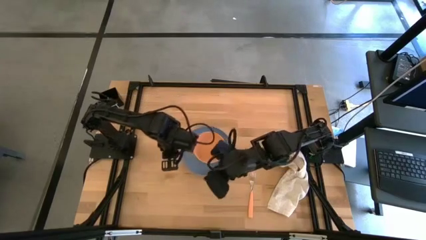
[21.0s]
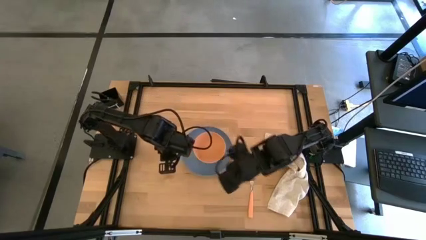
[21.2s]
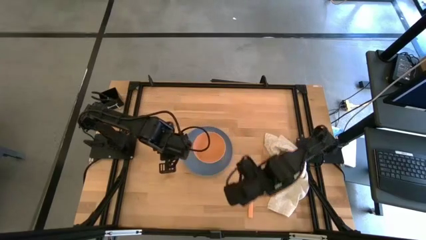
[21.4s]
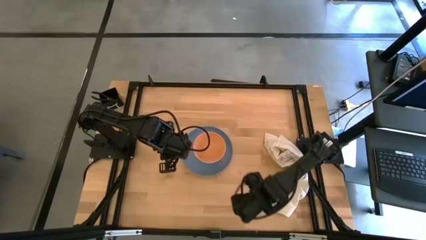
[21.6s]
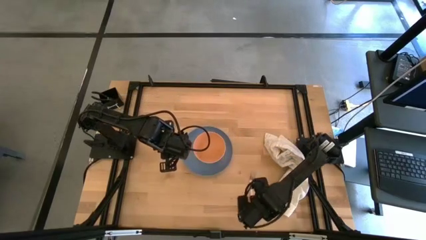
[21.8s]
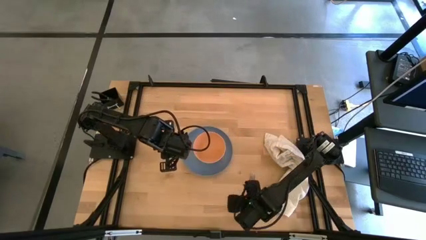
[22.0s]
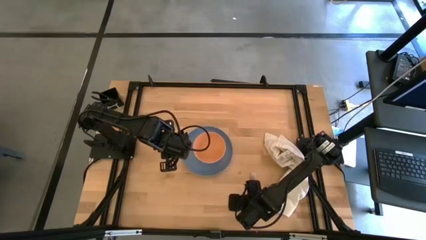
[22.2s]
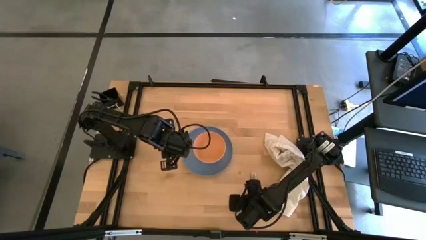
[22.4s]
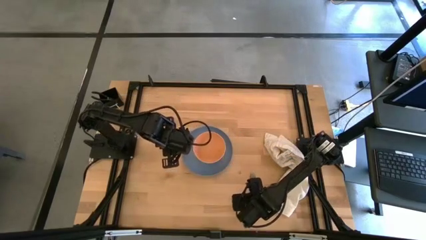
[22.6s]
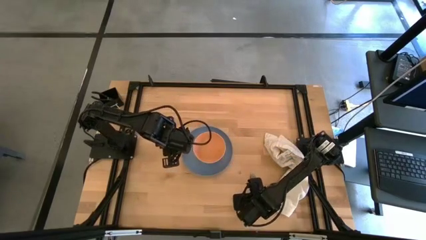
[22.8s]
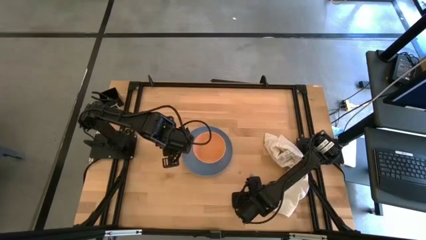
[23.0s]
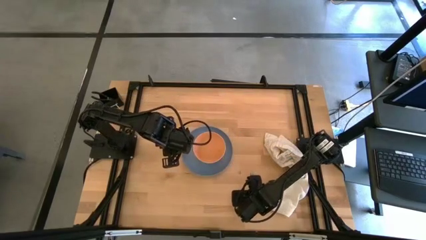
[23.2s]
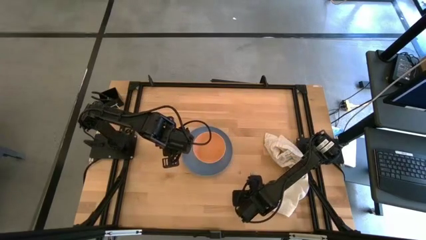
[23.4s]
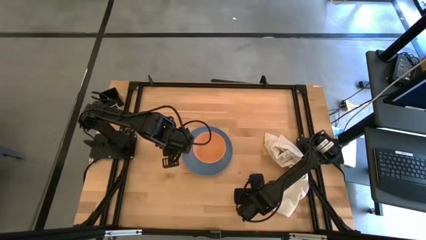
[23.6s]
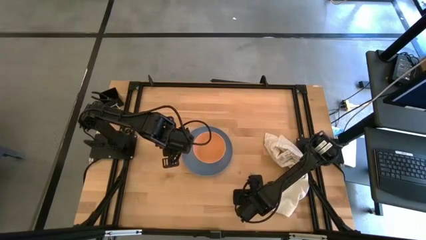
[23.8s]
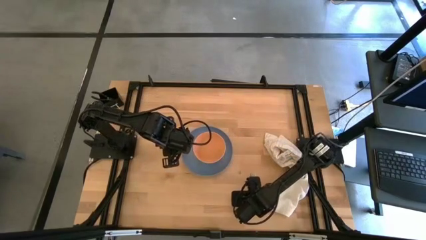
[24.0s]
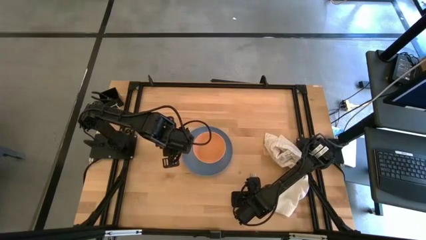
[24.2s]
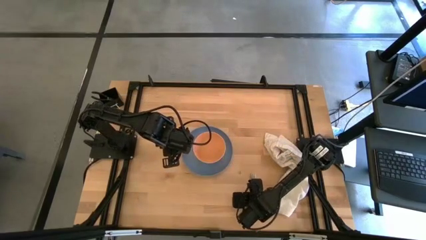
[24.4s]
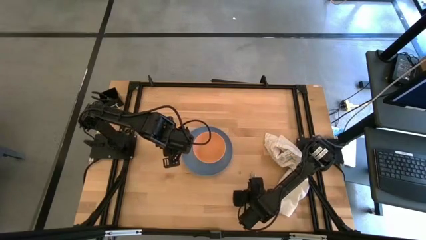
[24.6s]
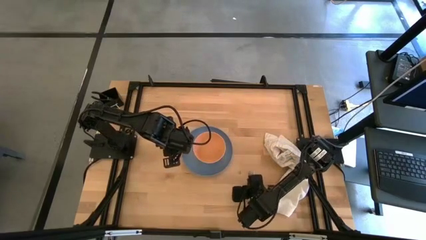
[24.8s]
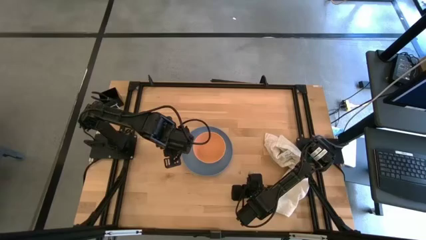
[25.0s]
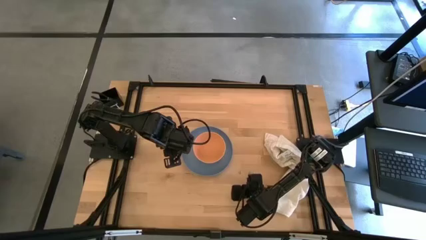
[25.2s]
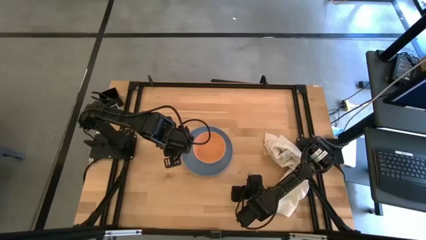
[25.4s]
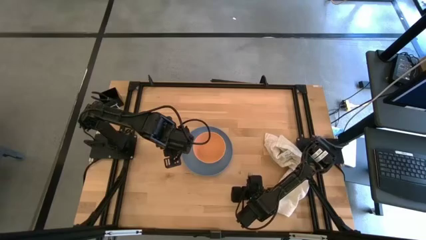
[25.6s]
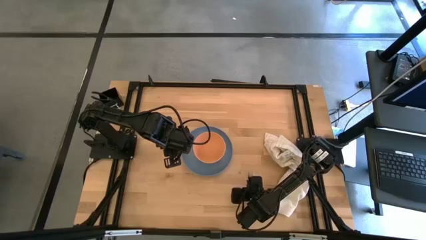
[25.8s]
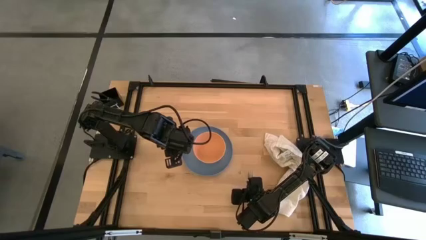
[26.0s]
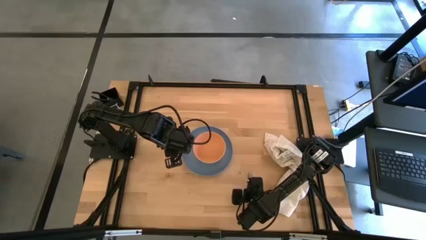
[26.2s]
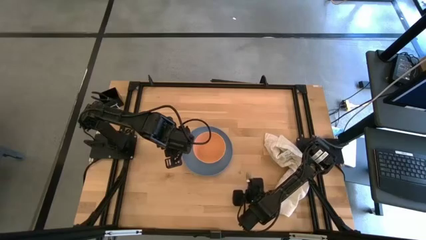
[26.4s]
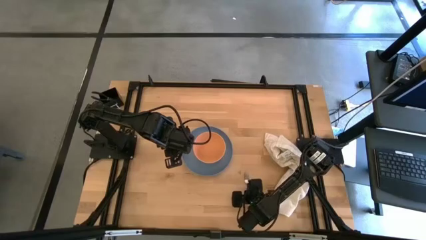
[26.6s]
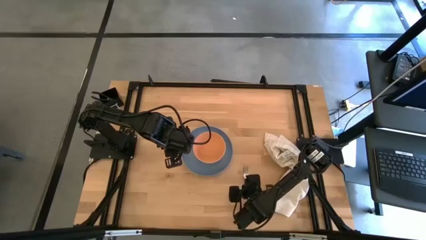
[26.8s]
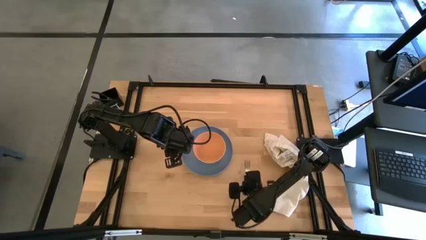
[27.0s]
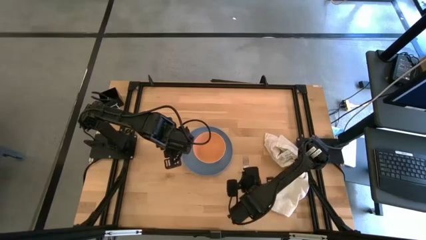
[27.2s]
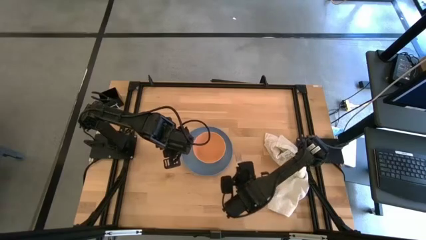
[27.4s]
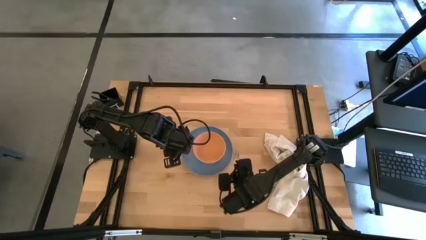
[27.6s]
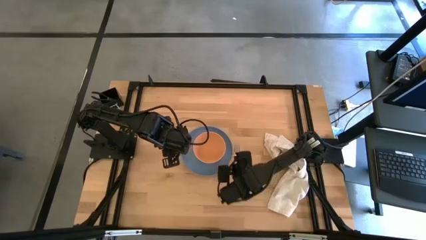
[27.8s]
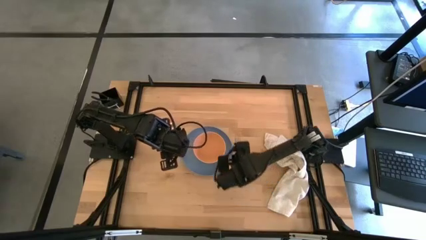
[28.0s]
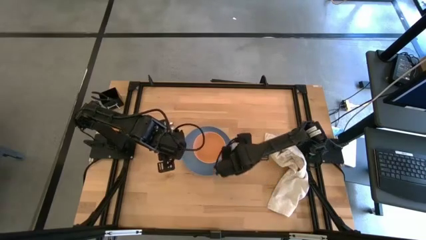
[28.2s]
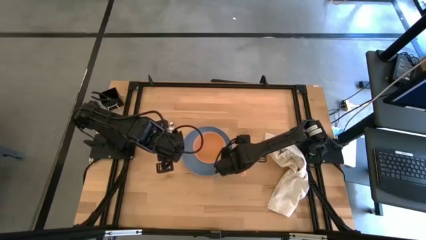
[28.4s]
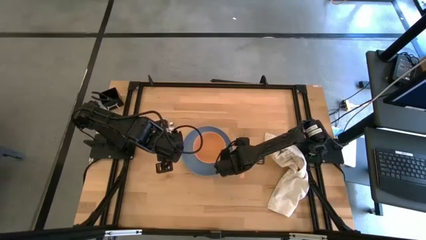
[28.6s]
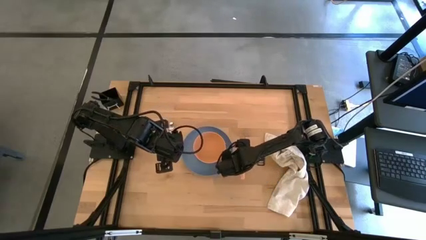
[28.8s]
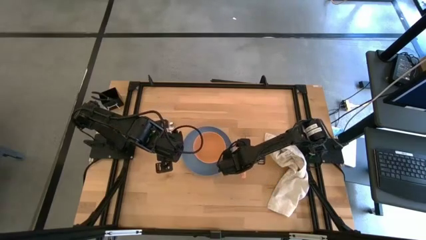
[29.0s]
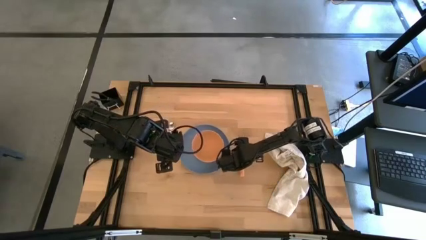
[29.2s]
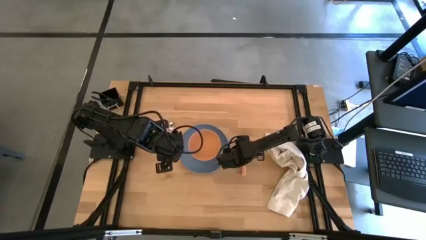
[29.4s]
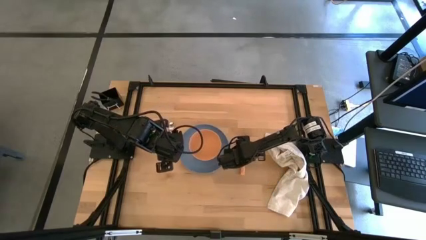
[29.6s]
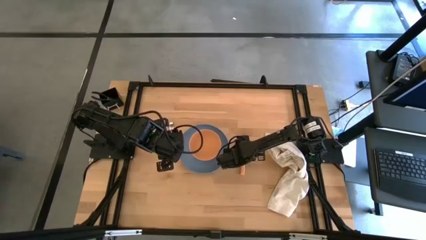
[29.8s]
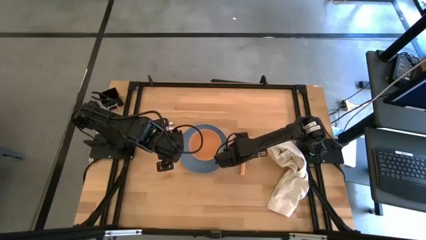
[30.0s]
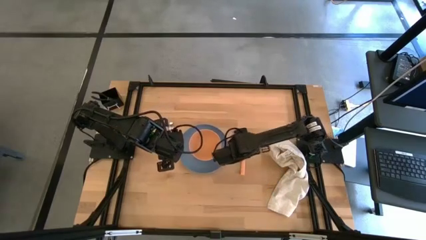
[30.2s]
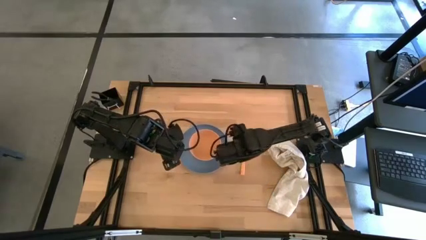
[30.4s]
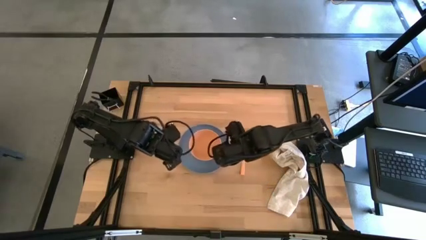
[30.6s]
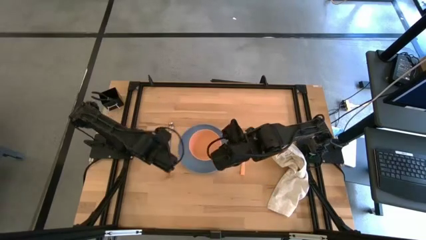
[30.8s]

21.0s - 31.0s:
Task: Set table place
Place the purple spoon into the orange bowl
